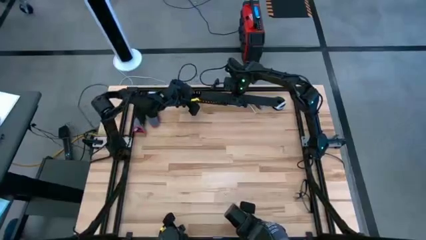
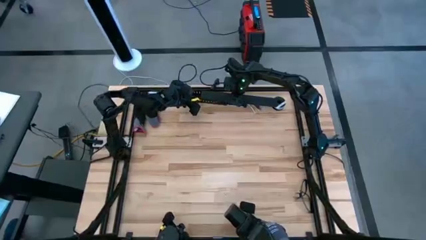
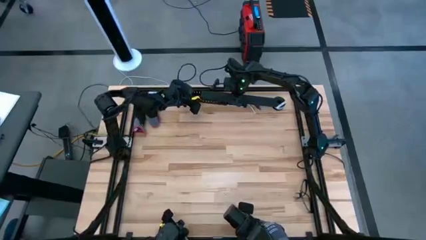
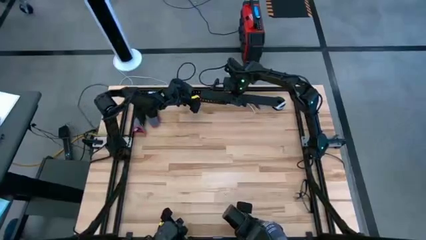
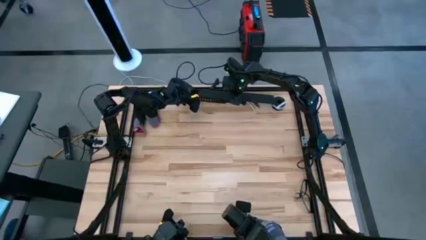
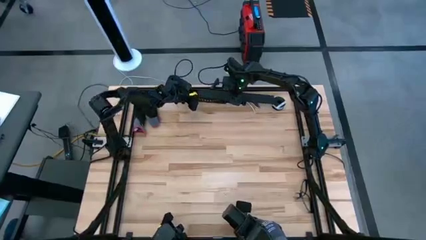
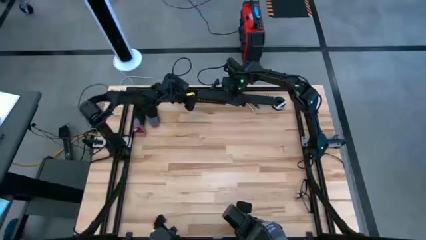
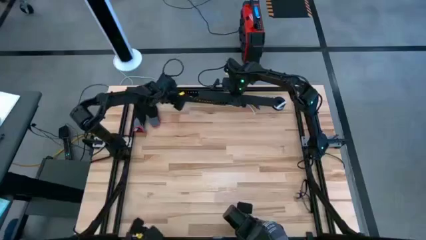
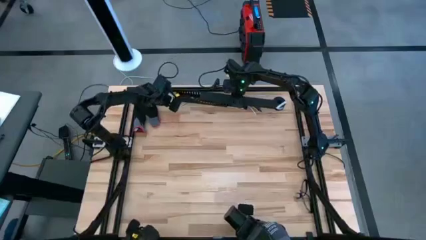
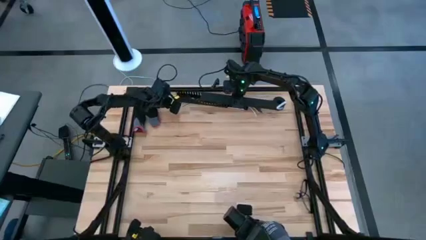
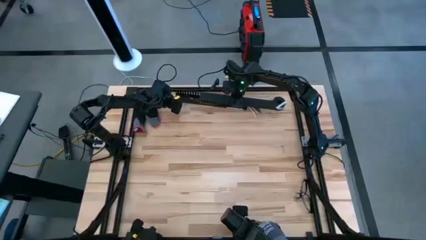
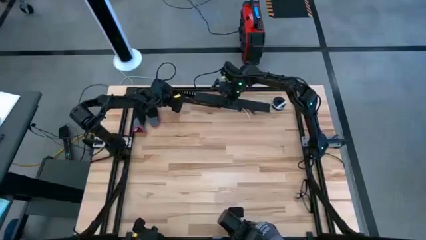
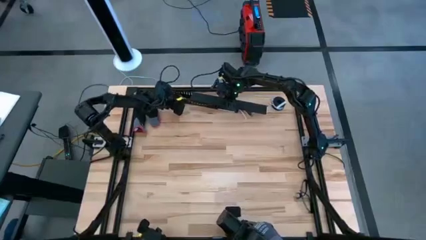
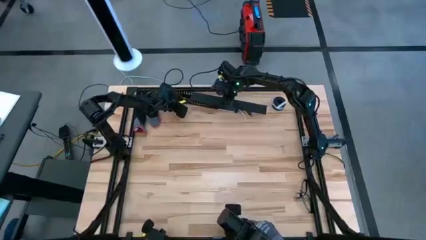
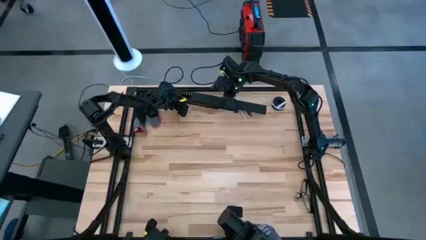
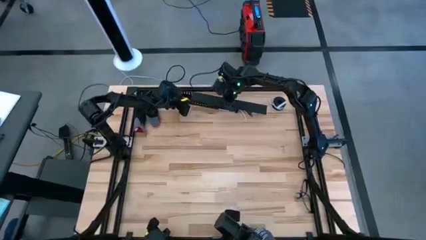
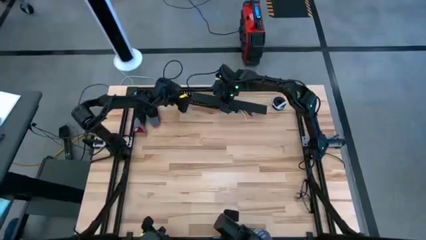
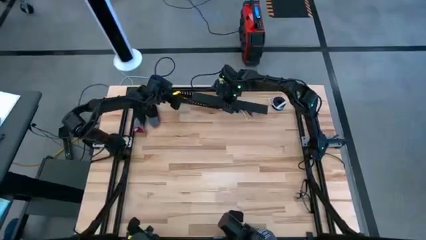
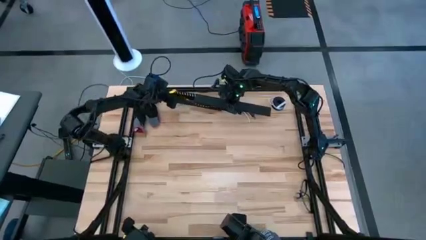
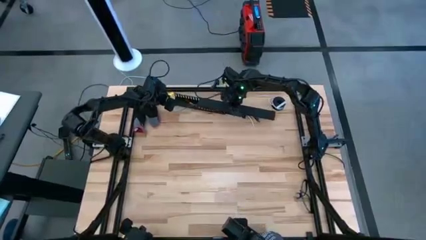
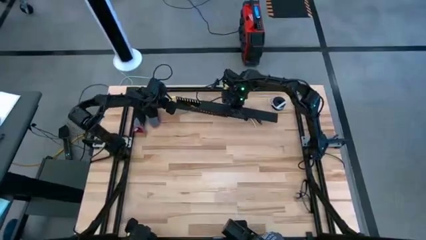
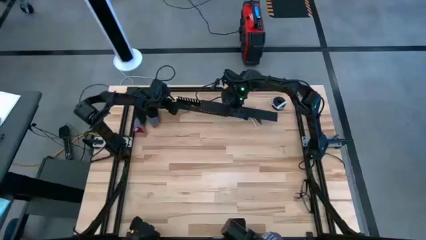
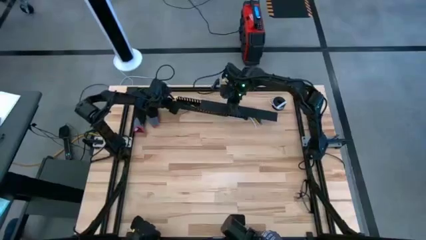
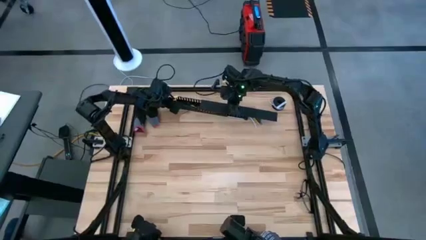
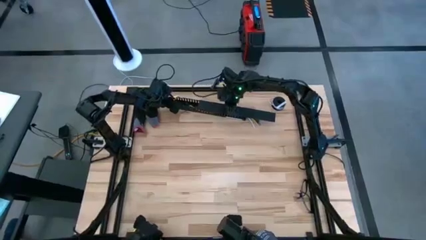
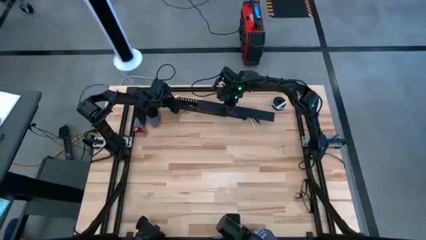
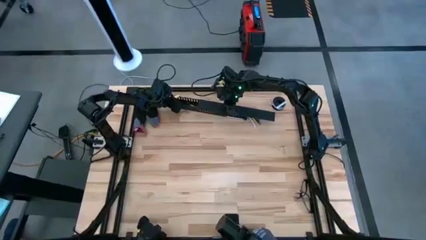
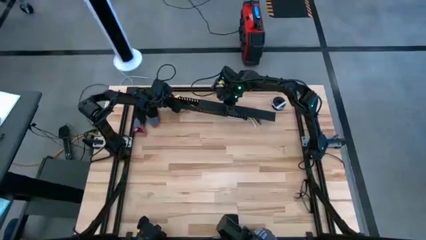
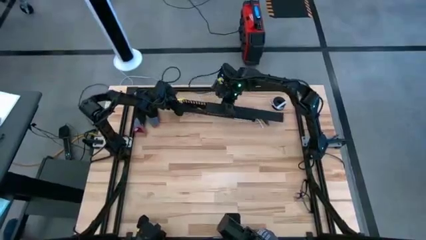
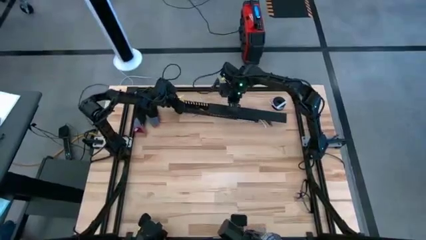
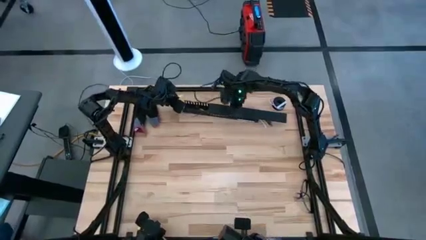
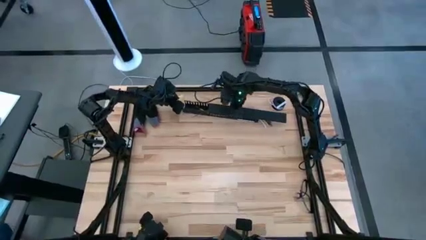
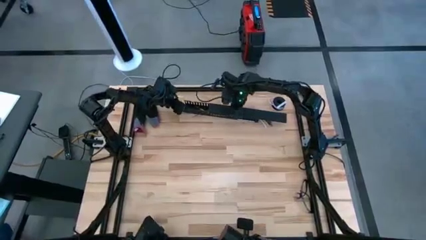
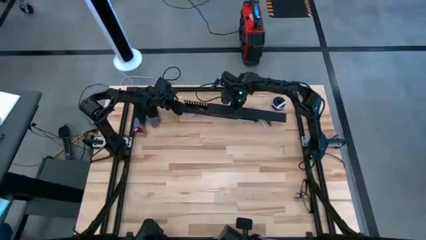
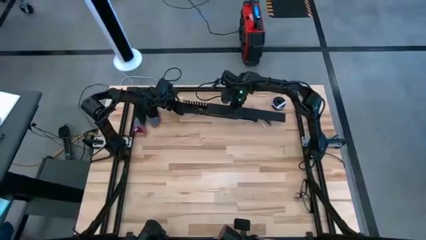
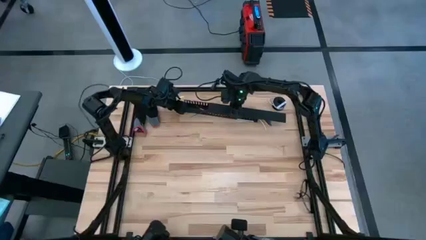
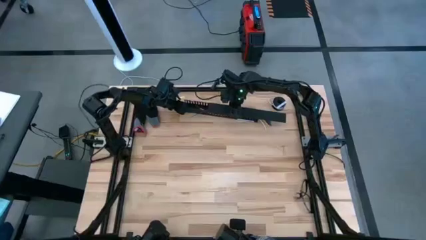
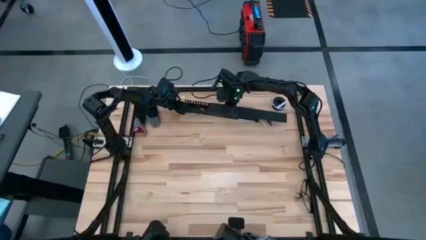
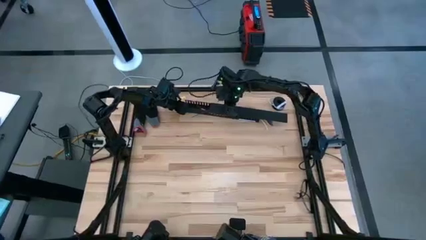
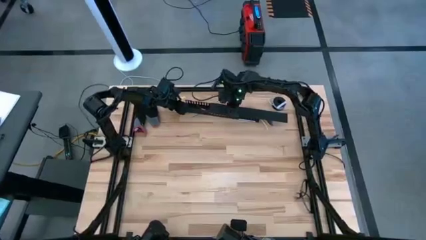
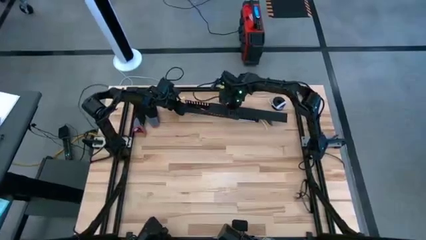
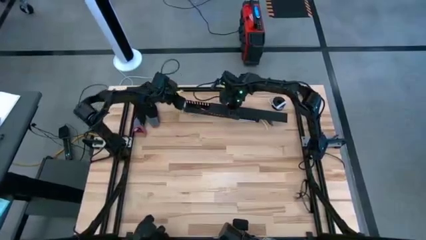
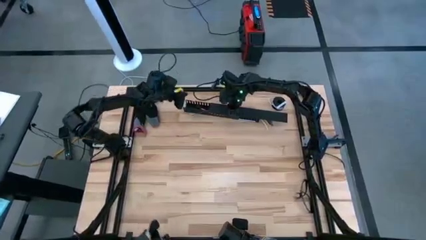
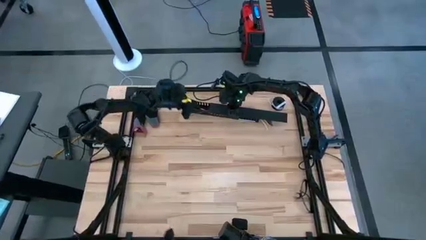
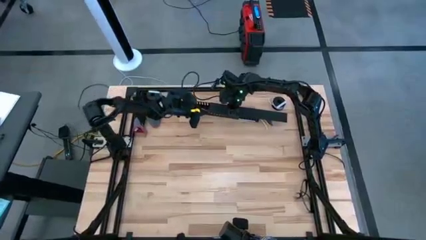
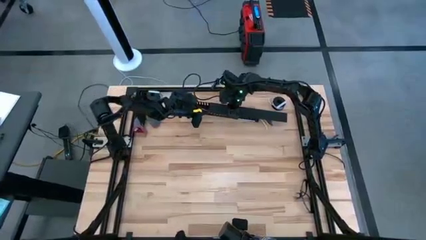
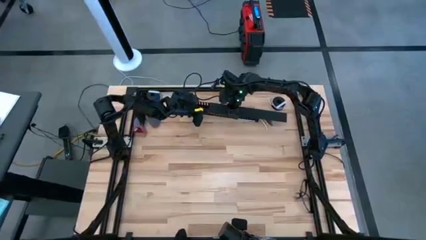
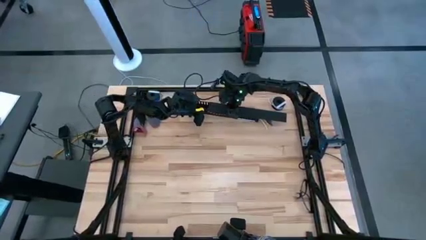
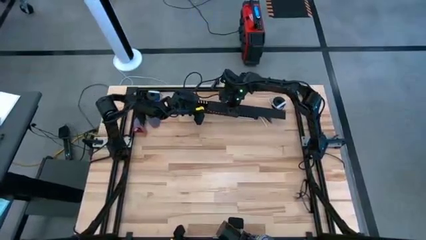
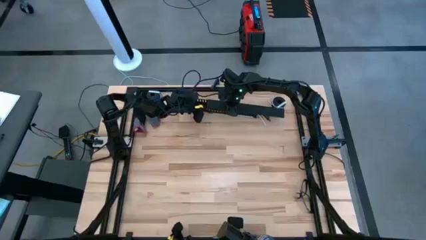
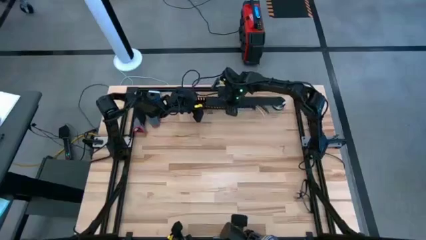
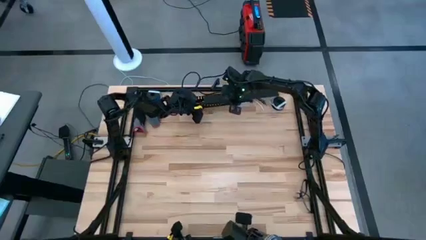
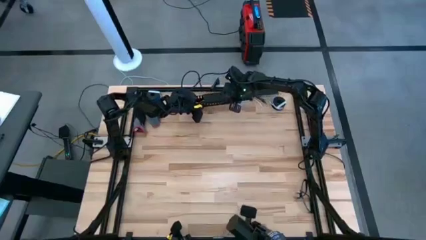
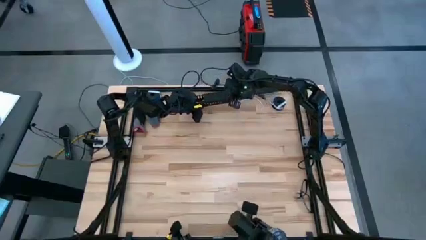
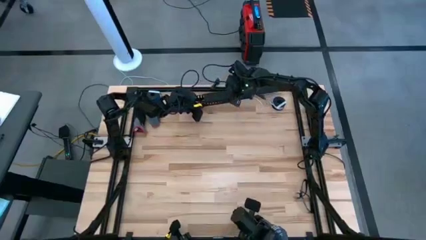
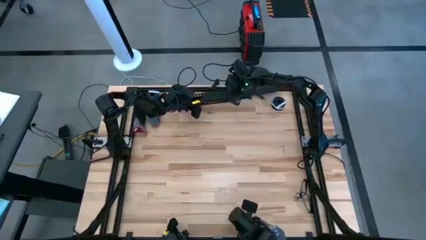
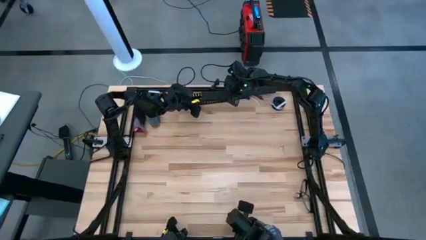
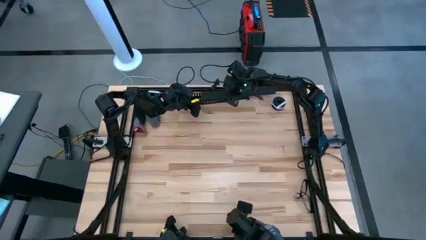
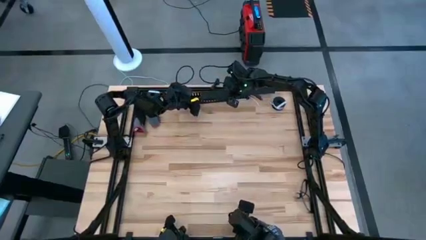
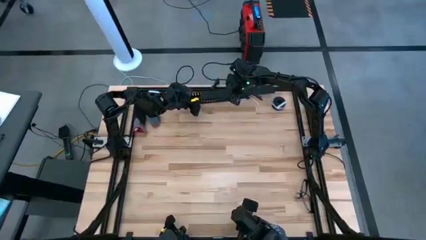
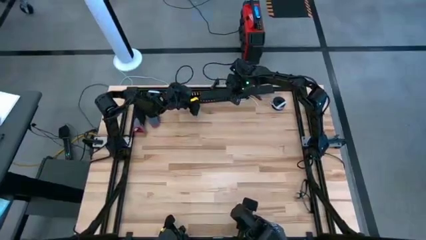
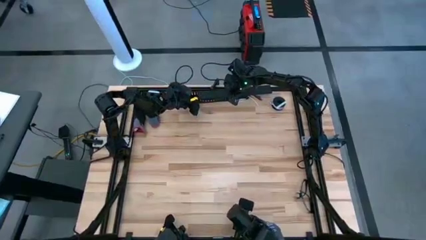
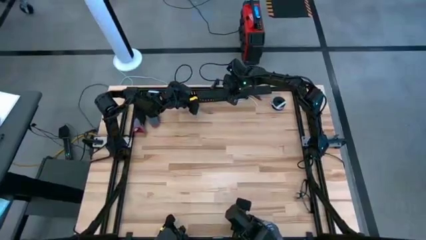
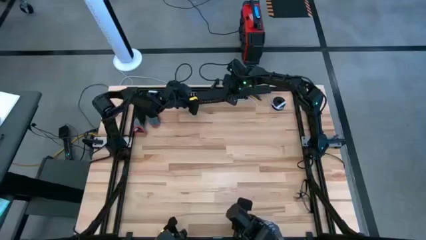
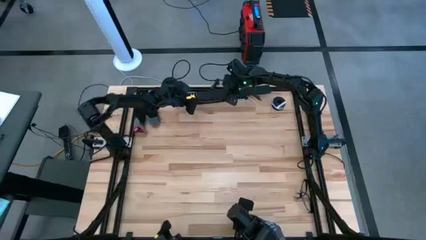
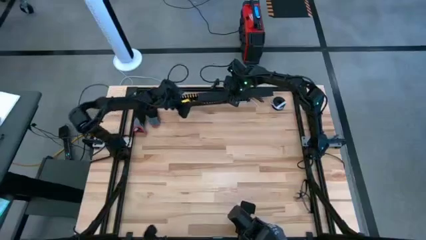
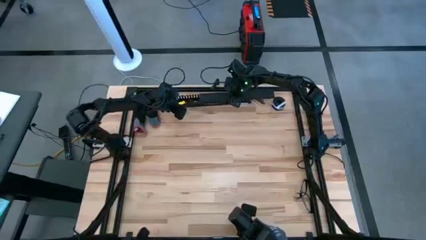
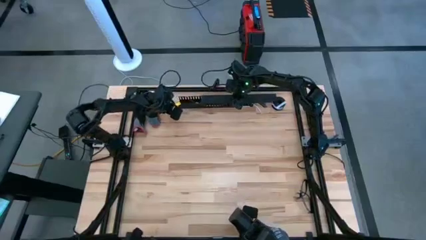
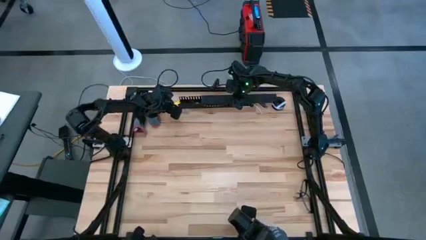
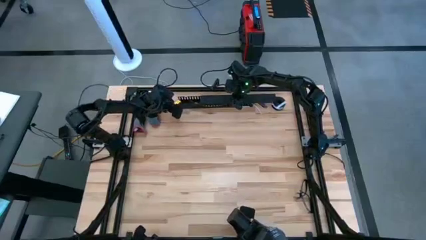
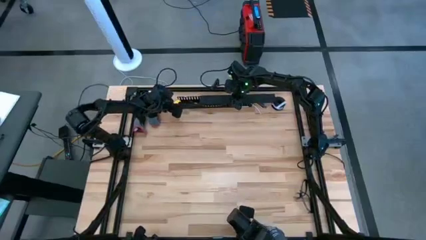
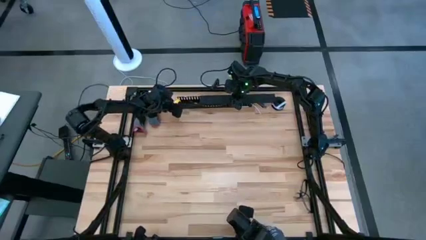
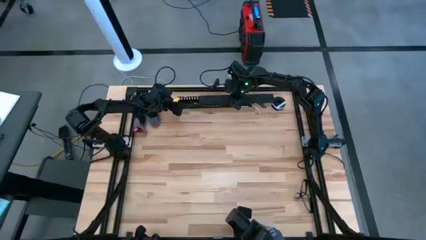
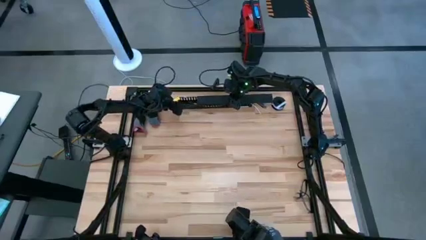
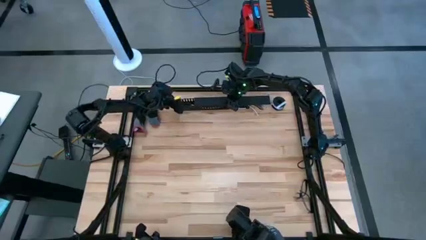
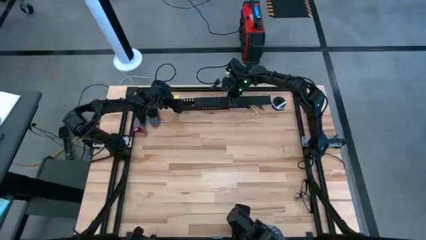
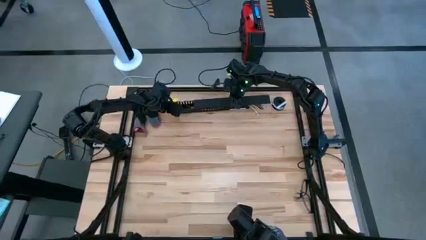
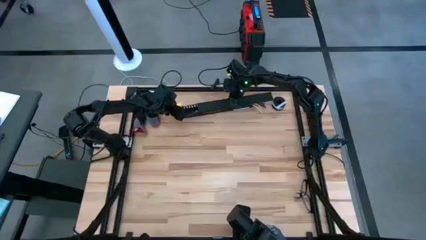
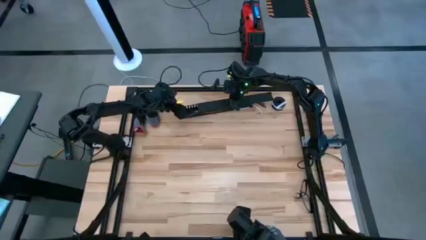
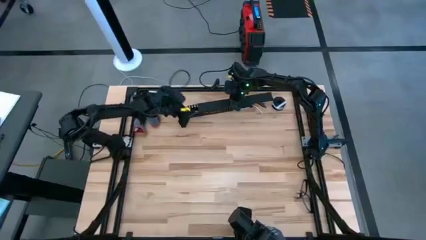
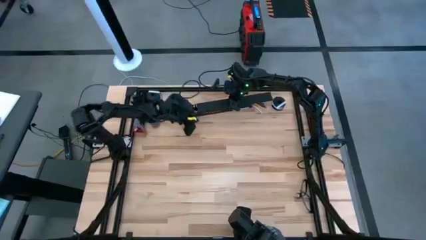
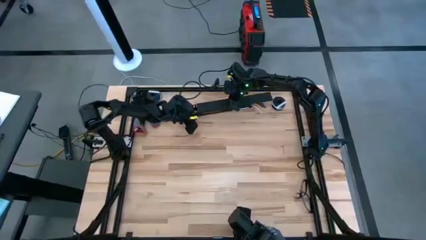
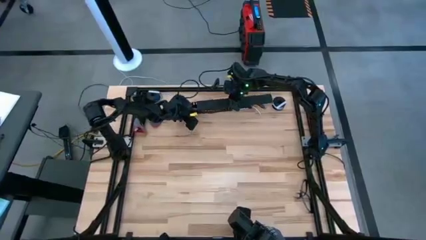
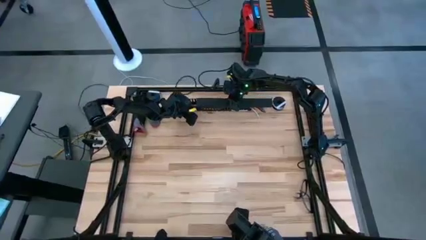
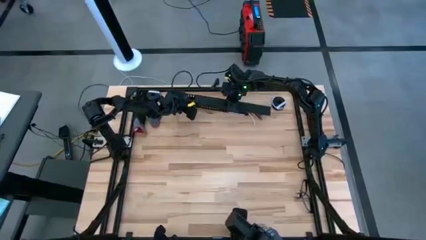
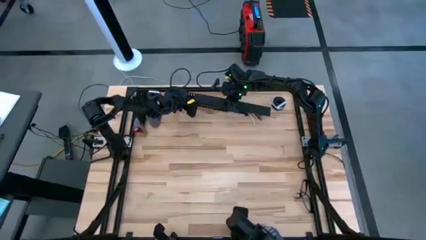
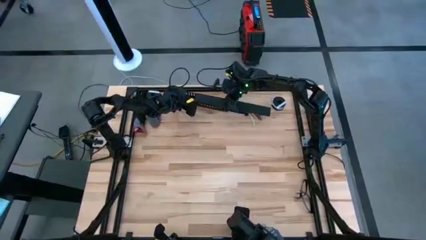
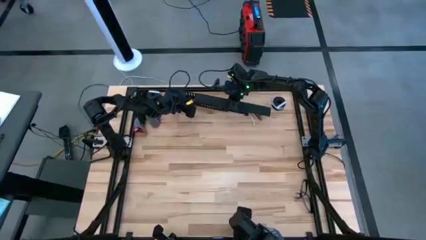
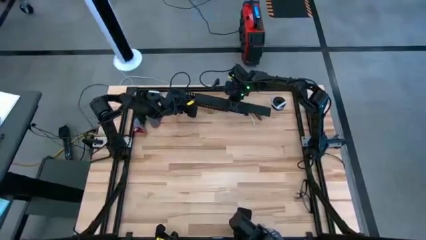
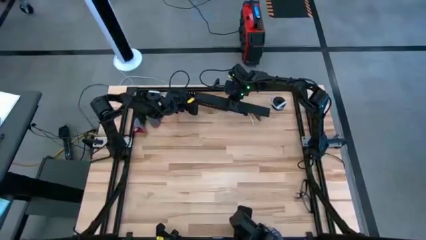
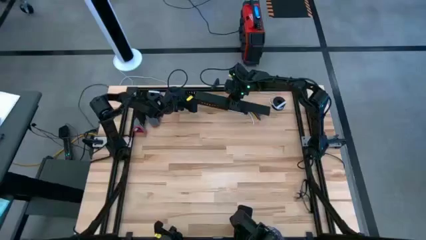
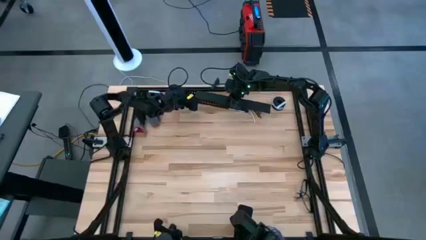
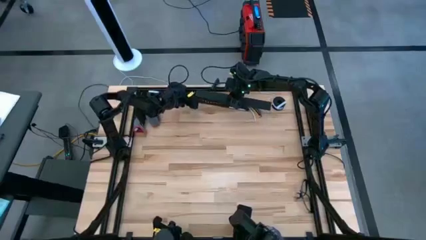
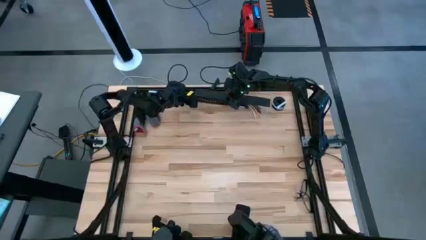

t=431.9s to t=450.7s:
Task: Ziptie cables
Close the black cable duct
